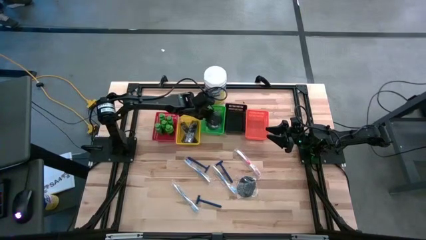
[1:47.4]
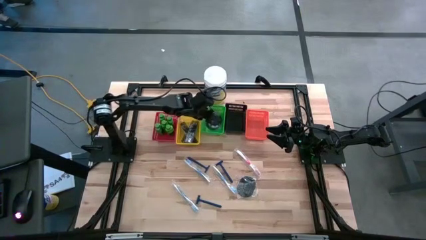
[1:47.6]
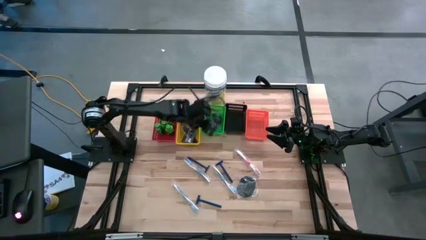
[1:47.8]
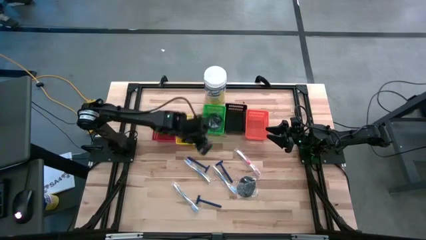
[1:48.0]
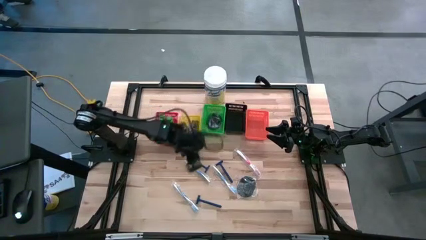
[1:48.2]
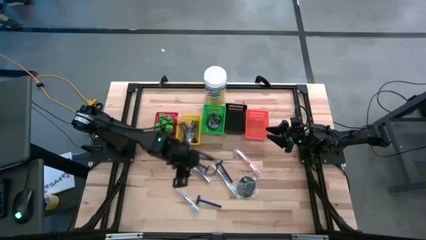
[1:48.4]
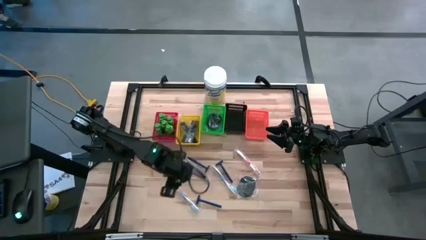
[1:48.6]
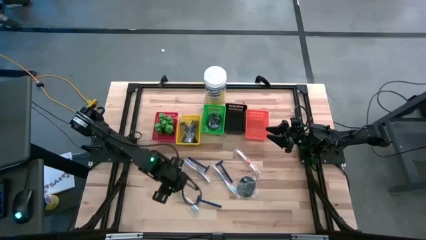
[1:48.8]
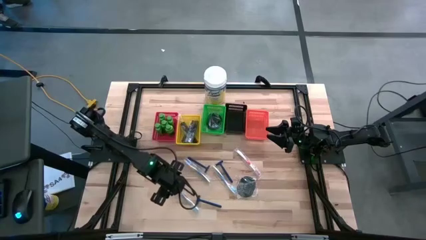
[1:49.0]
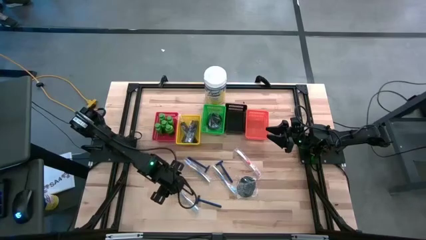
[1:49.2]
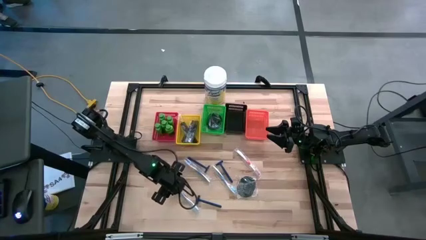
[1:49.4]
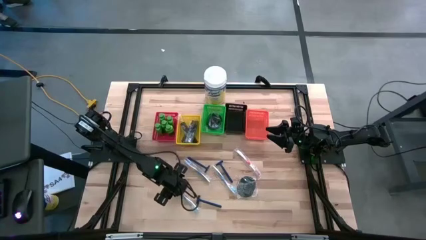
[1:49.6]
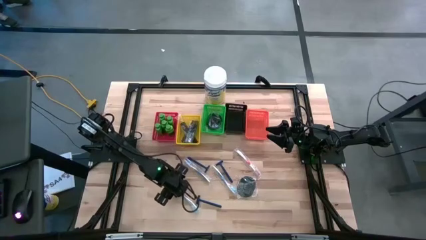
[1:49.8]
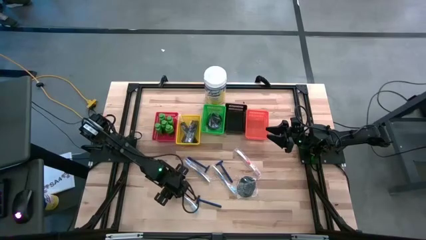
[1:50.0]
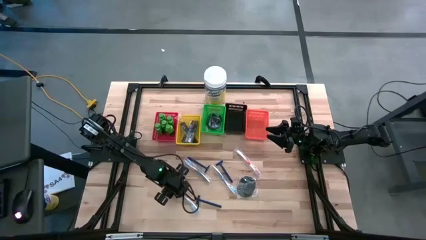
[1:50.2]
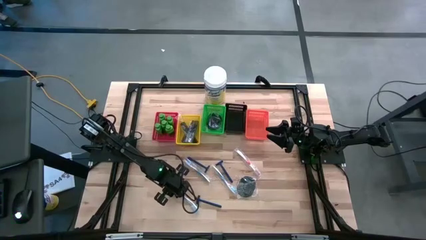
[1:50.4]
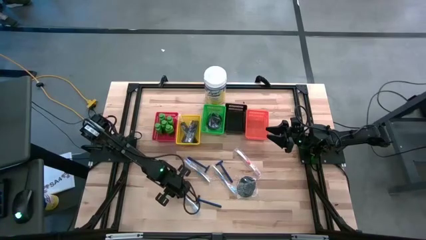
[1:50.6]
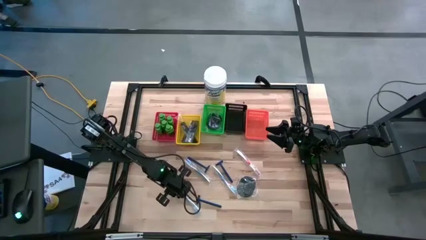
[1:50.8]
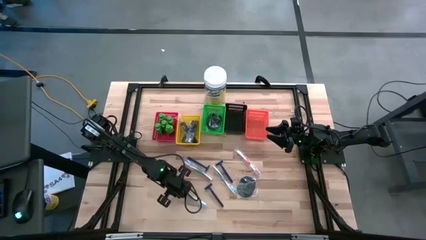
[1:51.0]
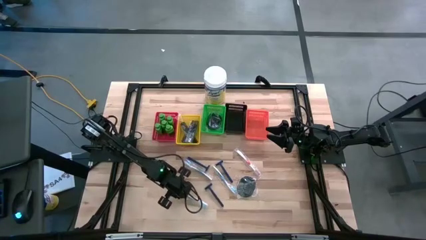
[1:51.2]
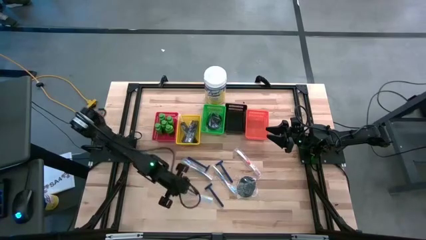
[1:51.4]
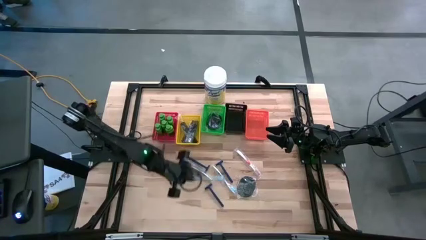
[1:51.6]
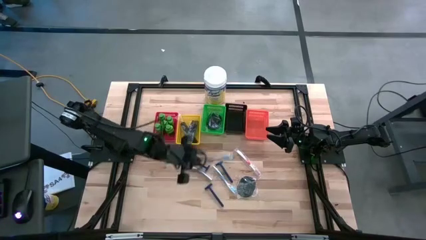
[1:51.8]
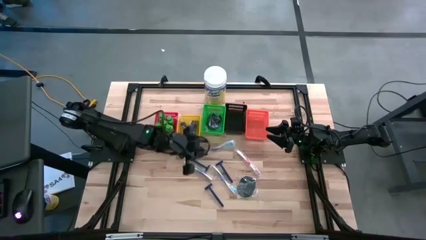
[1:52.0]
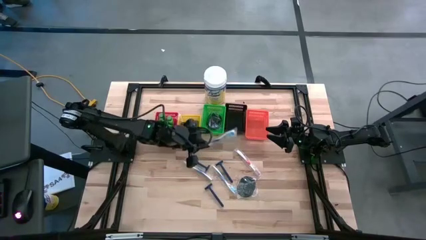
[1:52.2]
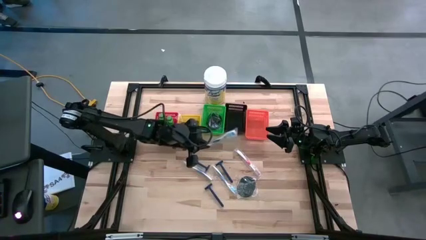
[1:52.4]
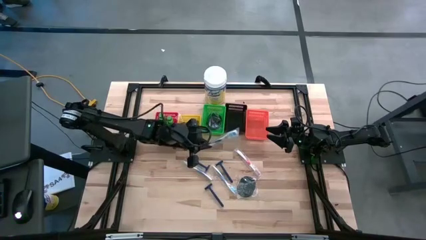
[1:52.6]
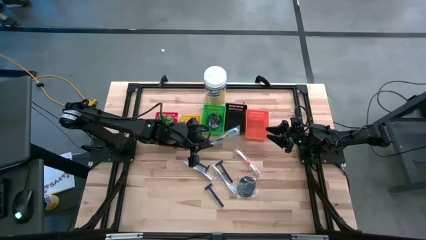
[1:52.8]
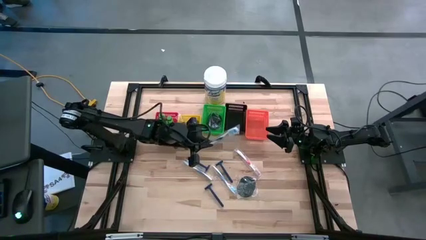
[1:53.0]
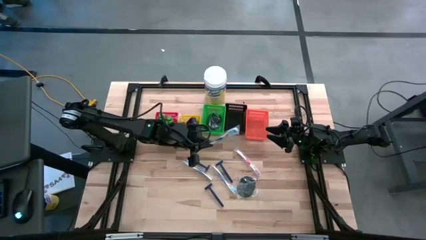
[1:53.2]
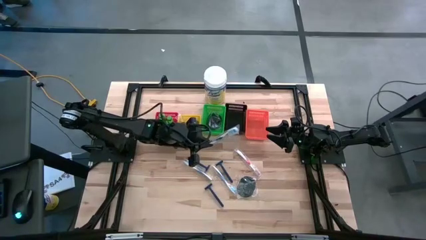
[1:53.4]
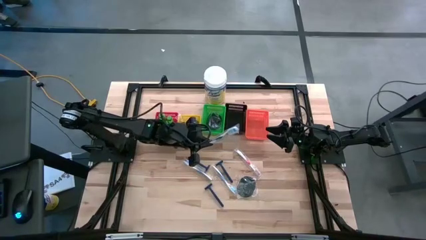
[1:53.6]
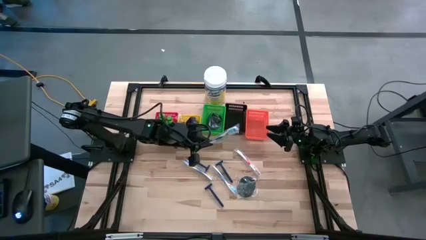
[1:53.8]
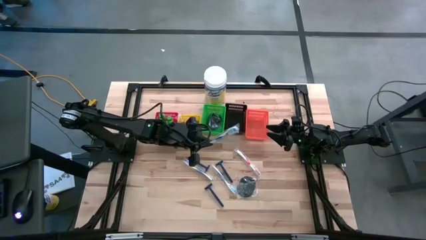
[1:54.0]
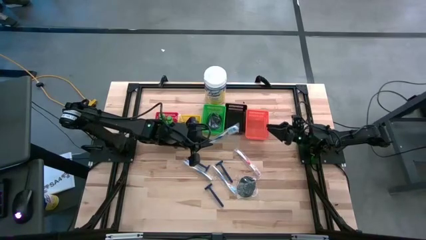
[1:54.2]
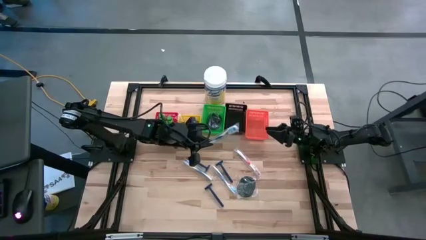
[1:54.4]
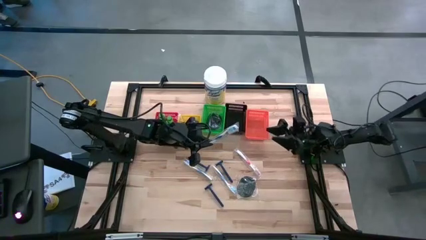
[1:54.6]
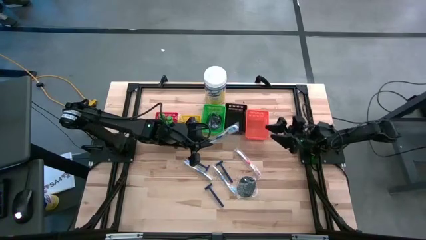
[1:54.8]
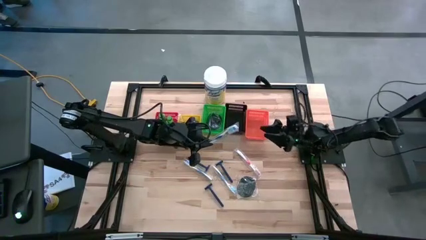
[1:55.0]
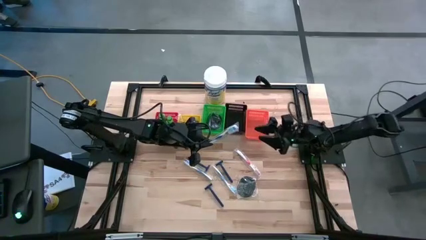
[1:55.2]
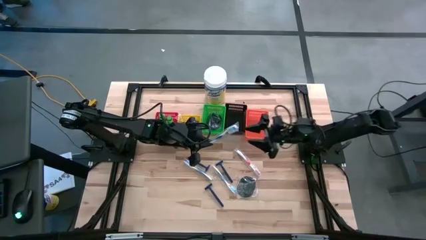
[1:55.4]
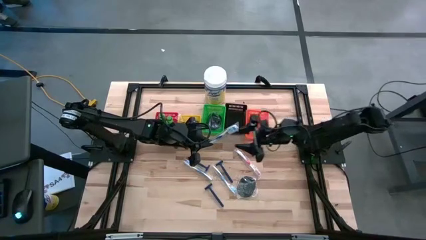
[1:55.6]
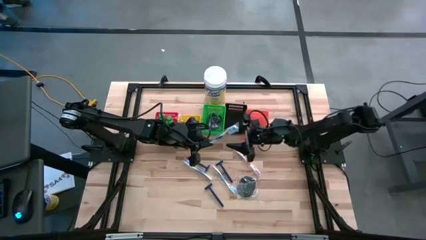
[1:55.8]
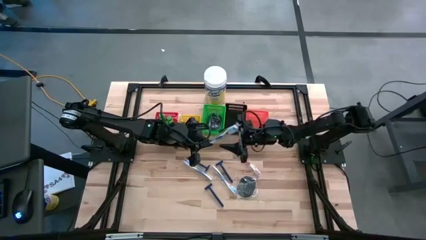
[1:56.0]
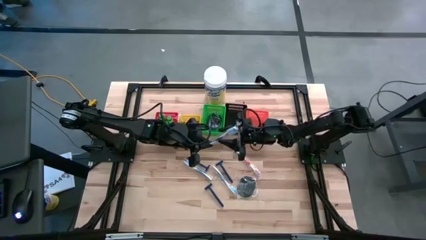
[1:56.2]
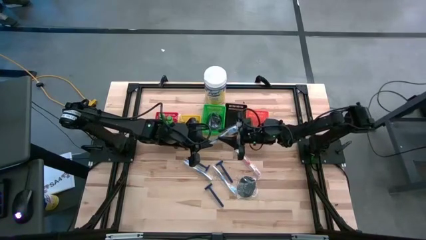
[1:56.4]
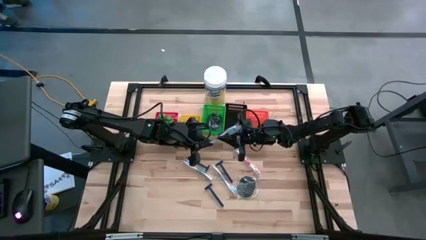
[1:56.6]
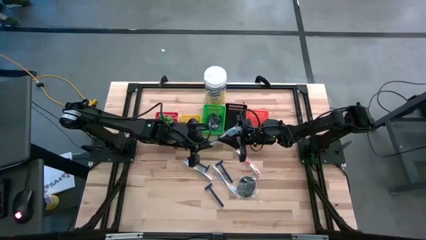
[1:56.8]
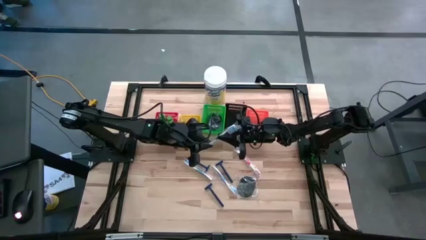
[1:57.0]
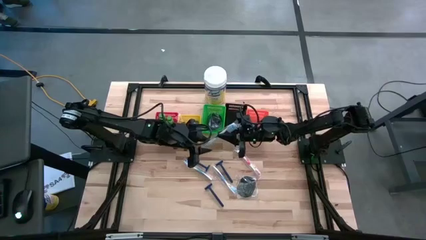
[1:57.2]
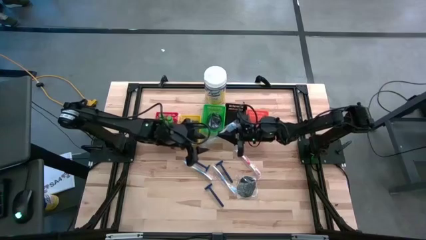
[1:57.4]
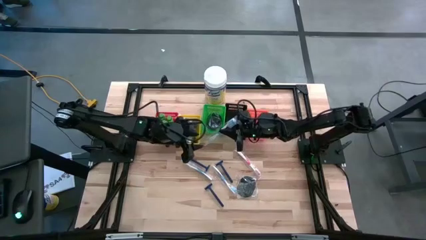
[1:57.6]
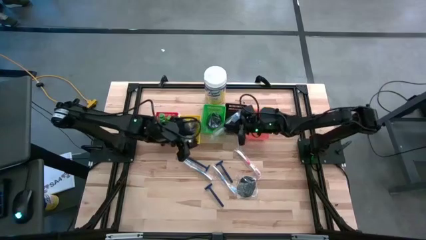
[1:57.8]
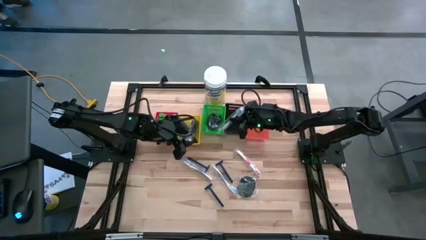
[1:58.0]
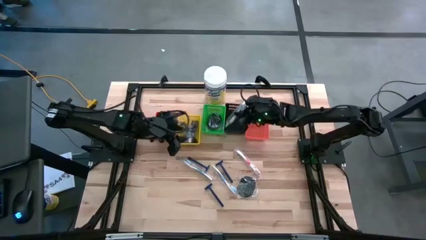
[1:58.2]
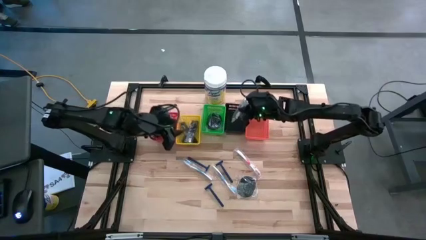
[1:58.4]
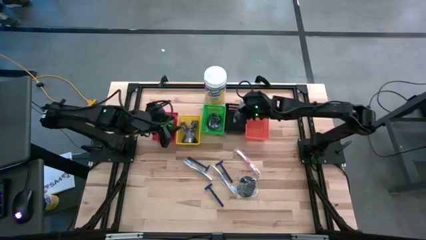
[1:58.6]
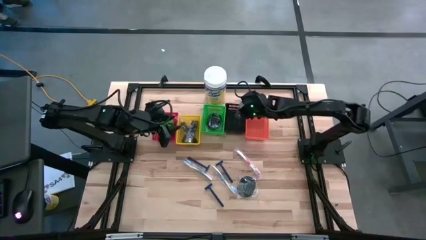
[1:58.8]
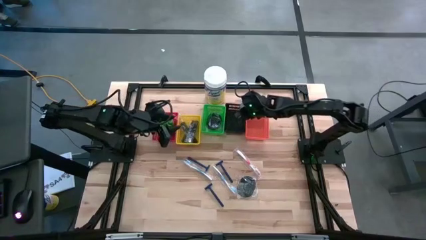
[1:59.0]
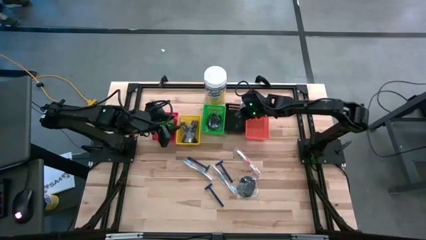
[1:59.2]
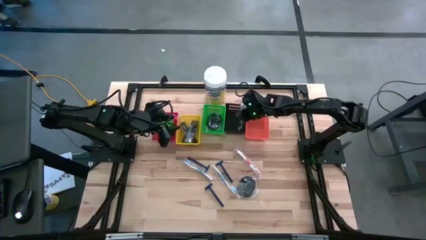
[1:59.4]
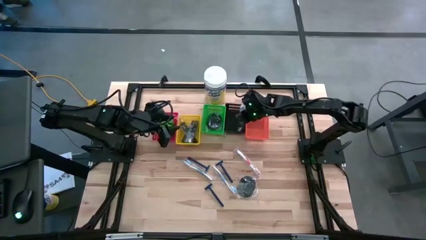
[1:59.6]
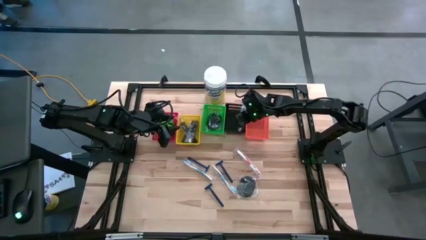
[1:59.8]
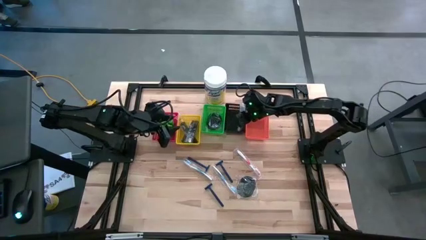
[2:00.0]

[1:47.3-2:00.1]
Task: Pick & Place Travel size toiletries
Put the blue toothbrush into the black bin

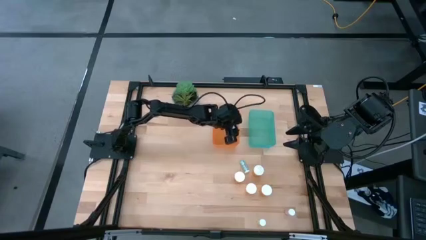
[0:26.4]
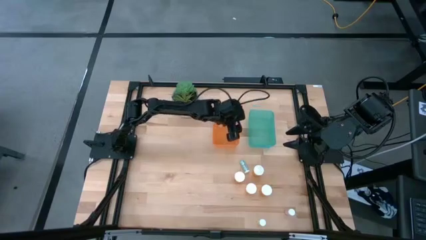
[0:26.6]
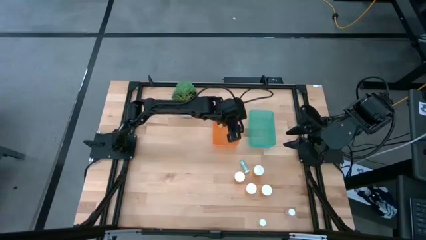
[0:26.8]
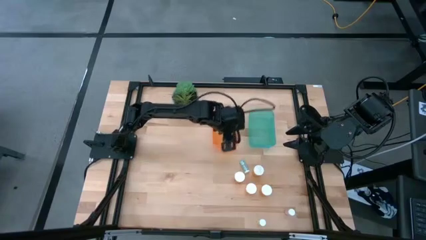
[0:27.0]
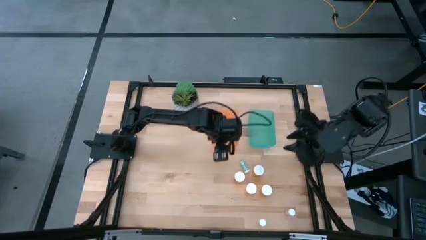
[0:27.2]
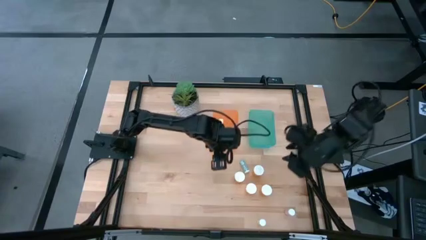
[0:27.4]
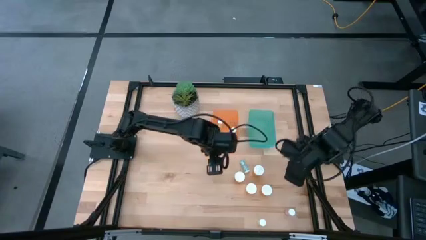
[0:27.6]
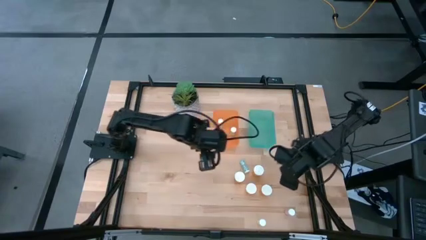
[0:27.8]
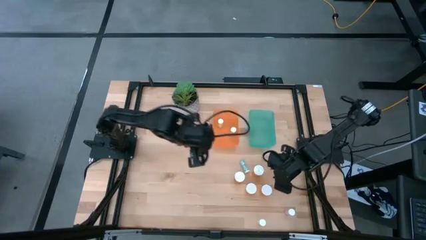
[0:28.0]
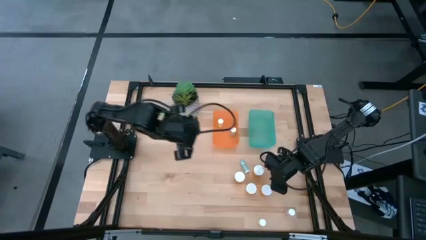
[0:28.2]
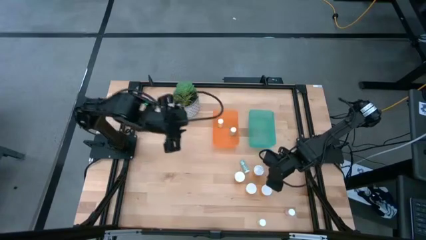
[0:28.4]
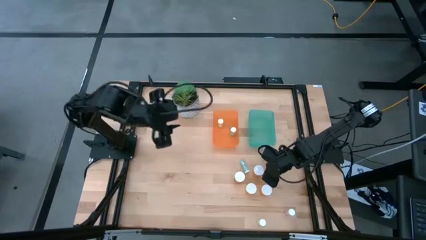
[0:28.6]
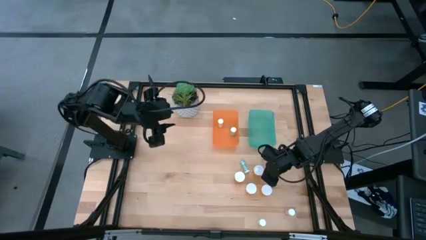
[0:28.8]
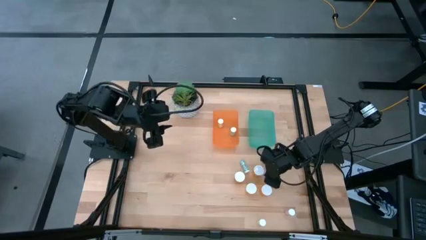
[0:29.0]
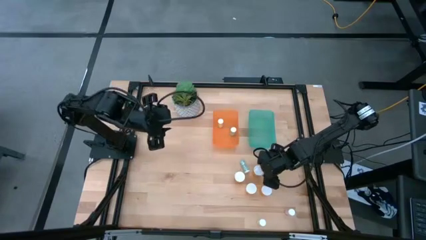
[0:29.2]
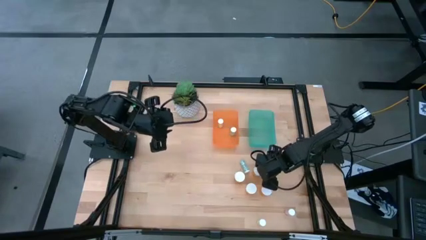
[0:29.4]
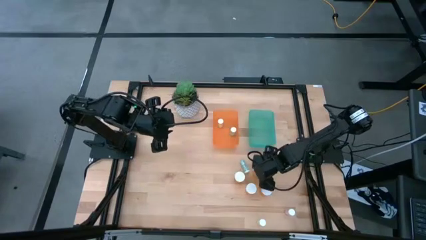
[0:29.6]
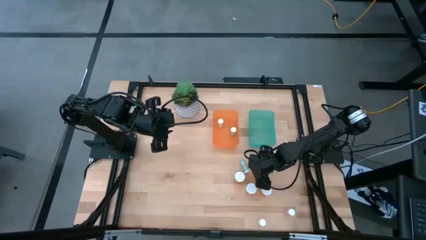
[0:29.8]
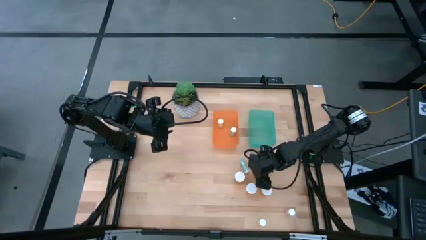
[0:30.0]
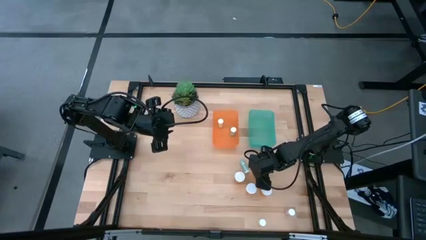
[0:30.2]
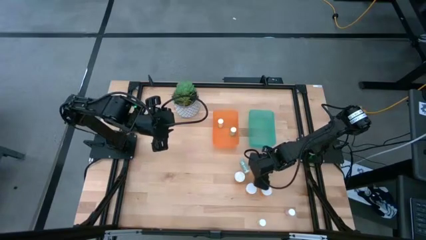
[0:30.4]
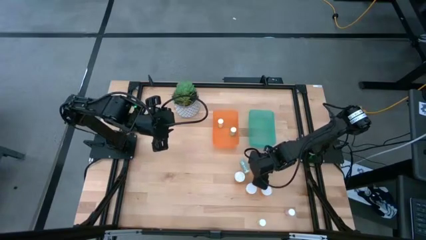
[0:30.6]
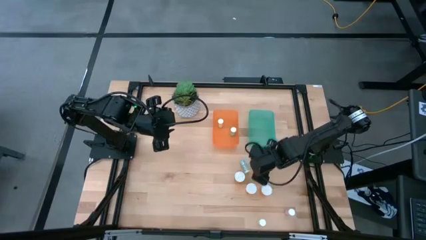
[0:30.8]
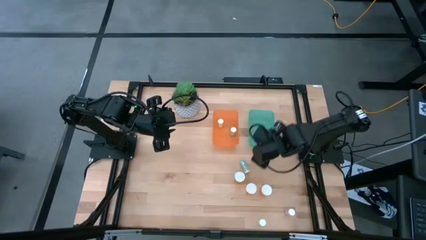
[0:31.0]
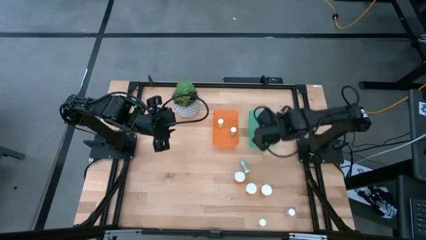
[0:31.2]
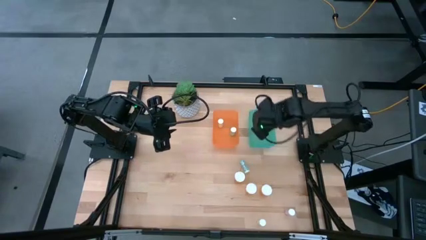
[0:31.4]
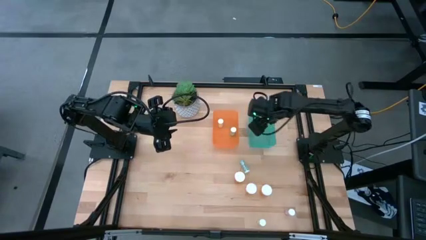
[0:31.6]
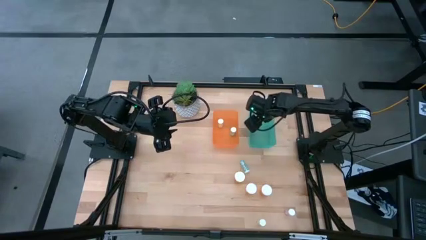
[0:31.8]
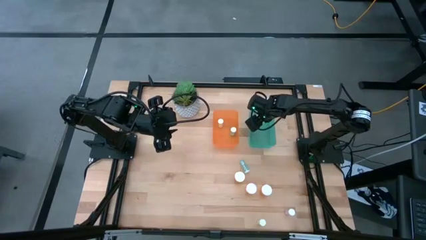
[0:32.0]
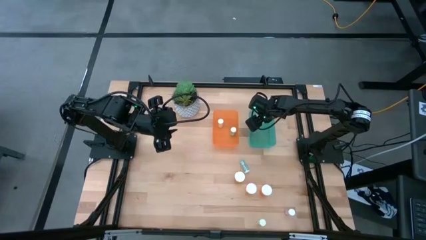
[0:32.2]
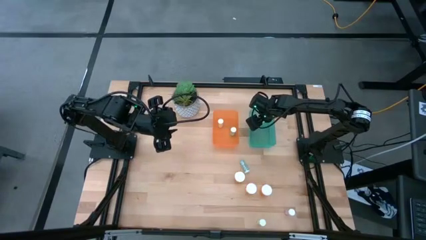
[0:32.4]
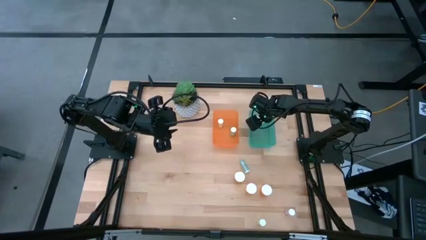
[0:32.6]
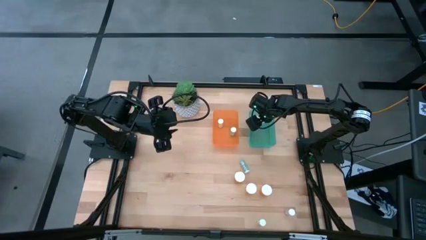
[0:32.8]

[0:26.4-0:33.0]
Task: Pick and place medicine bottles into bin by pill shape (circle, oval)
Put the large orange bottle into the green bin
